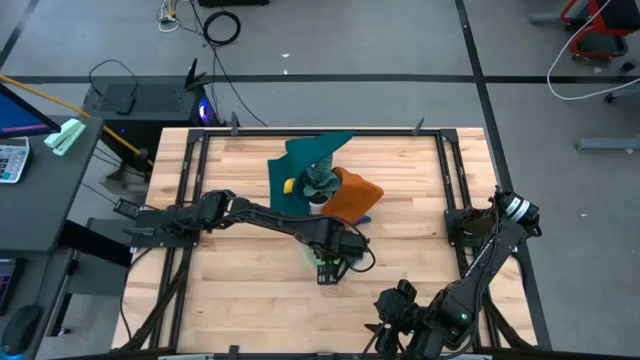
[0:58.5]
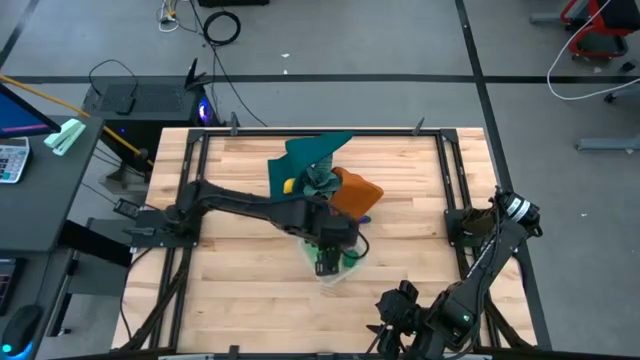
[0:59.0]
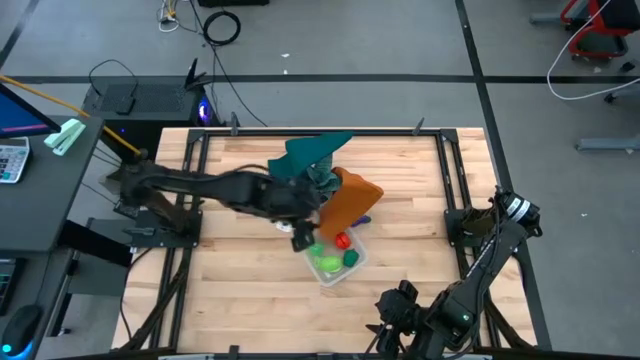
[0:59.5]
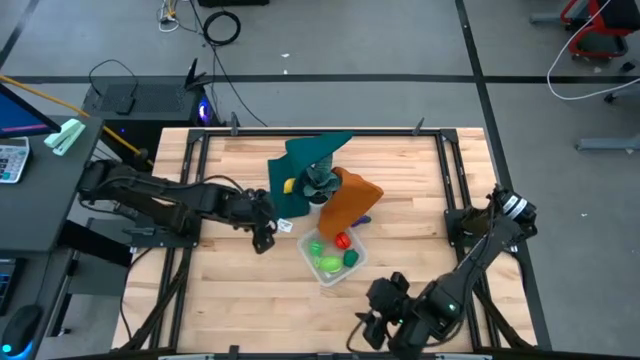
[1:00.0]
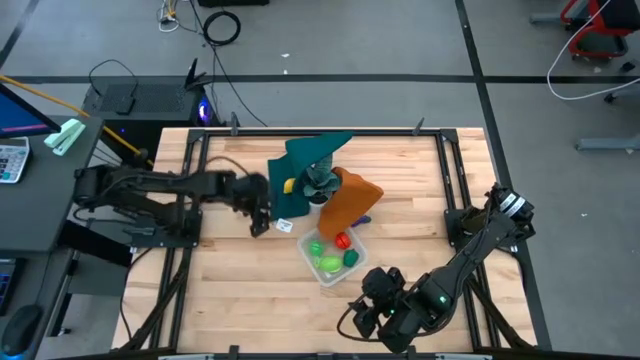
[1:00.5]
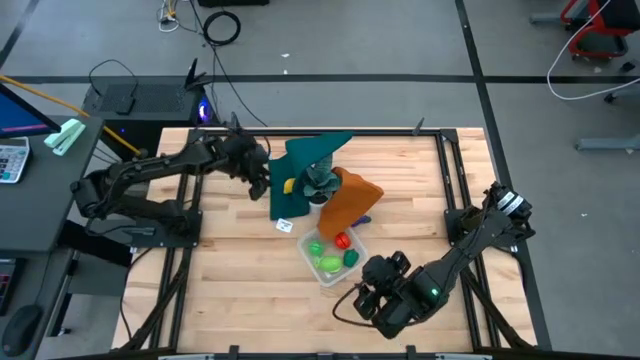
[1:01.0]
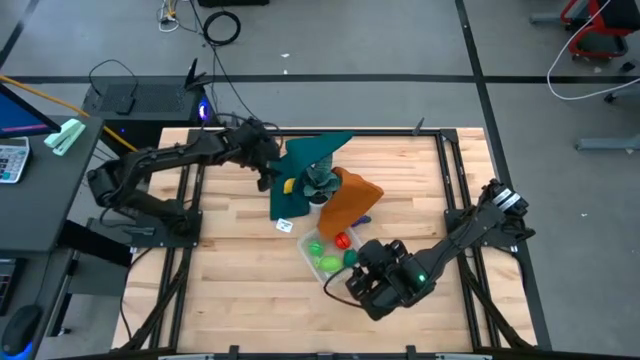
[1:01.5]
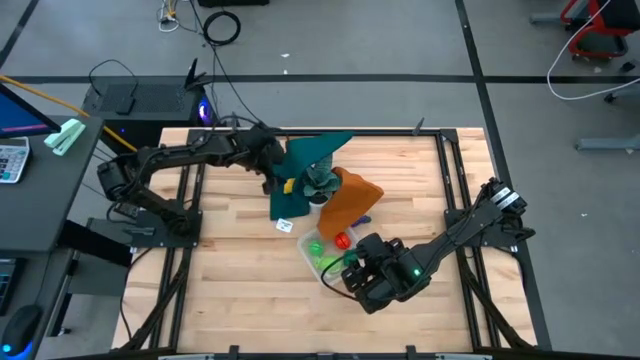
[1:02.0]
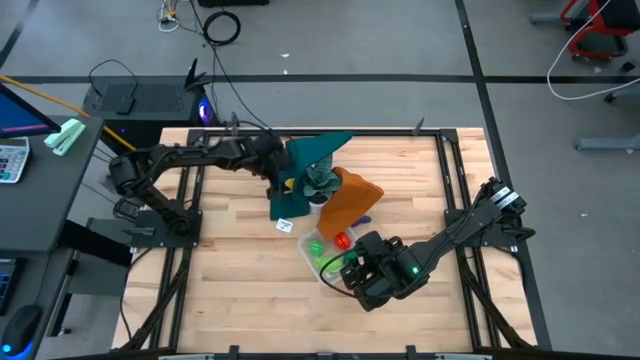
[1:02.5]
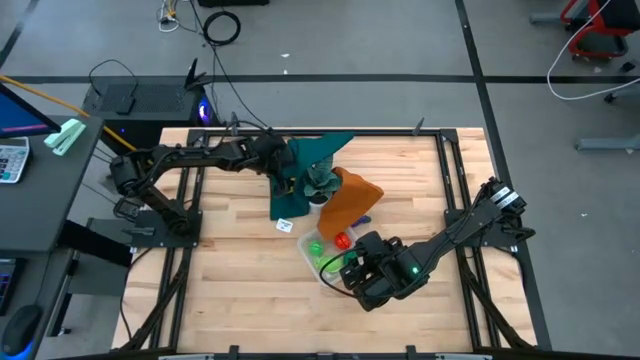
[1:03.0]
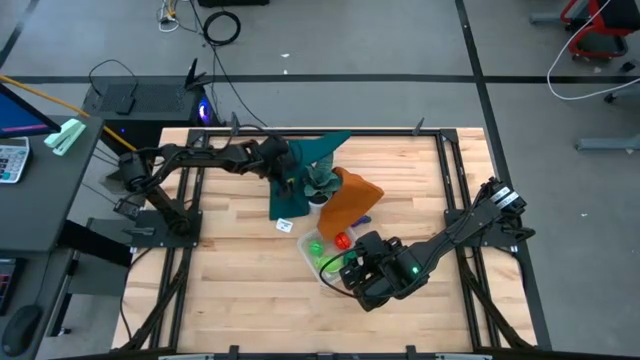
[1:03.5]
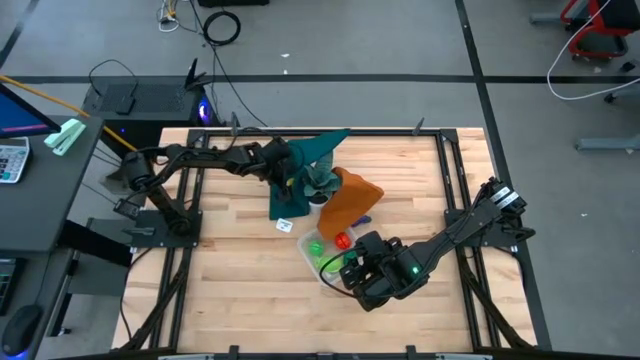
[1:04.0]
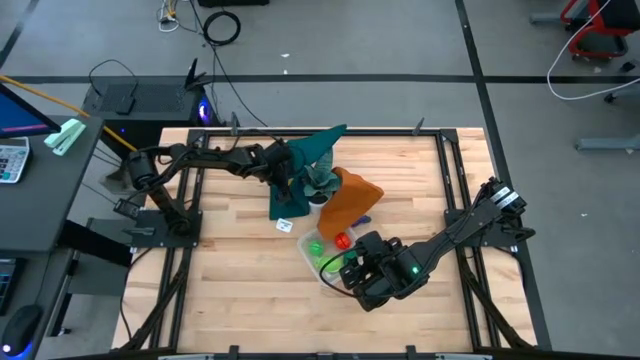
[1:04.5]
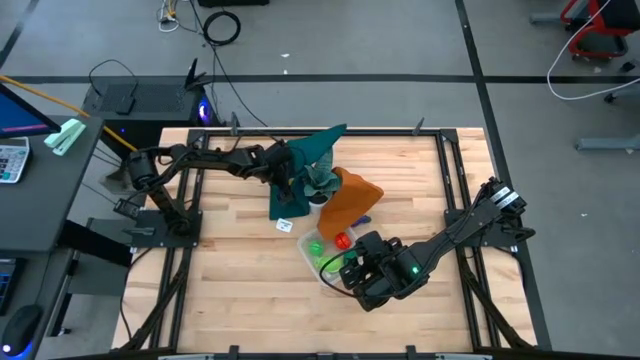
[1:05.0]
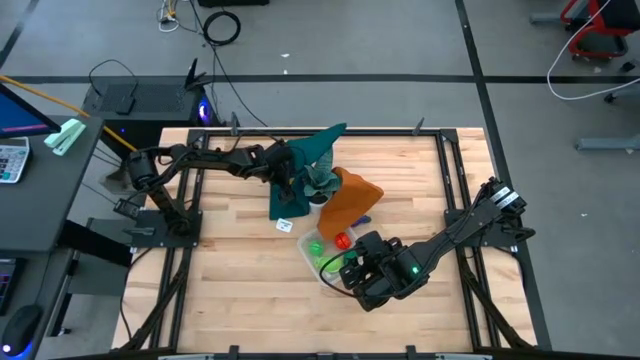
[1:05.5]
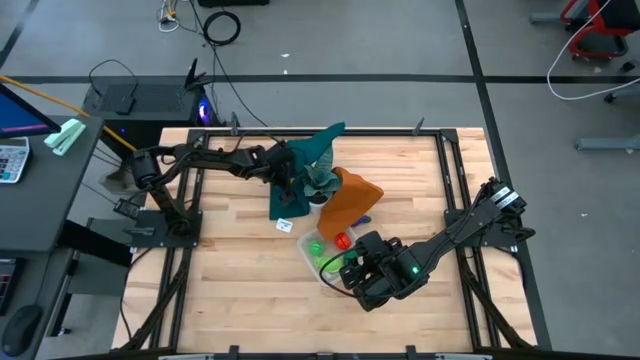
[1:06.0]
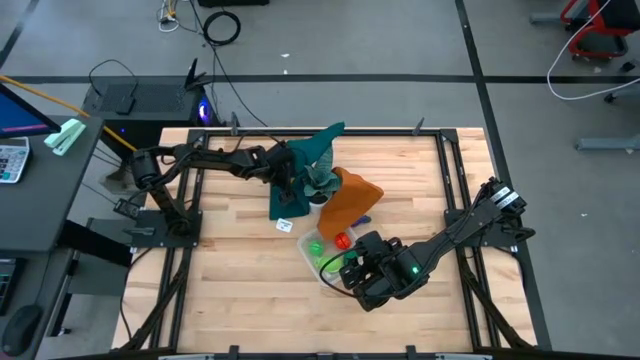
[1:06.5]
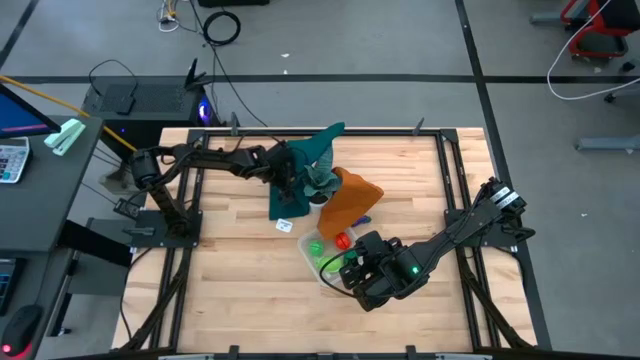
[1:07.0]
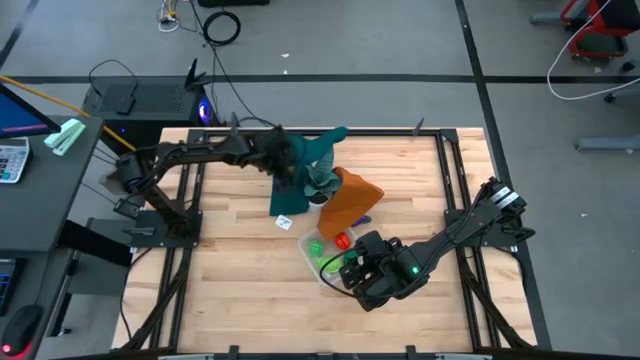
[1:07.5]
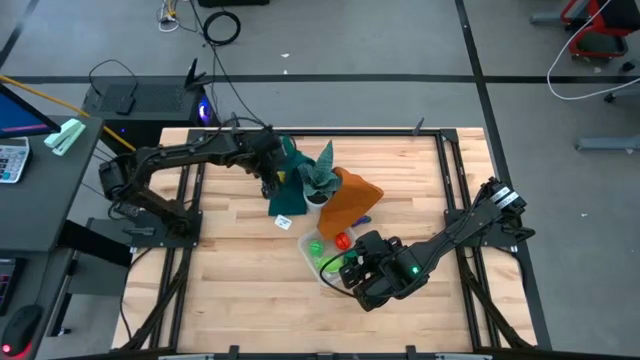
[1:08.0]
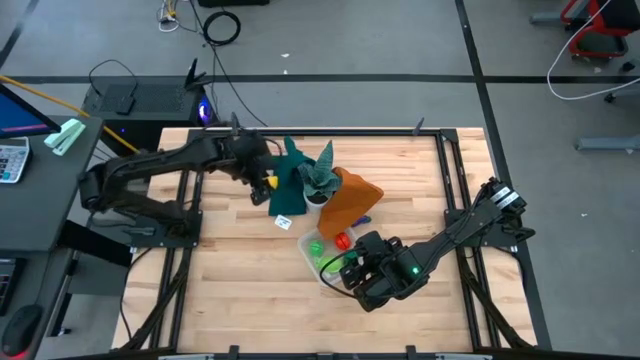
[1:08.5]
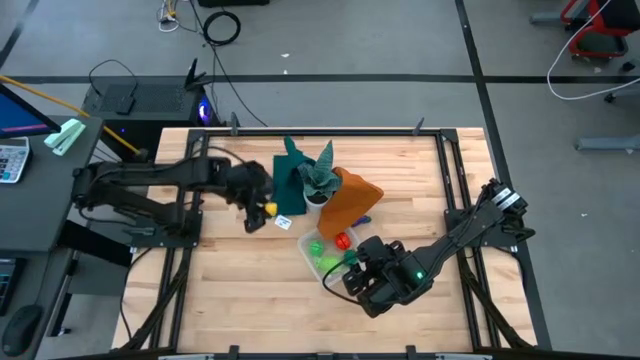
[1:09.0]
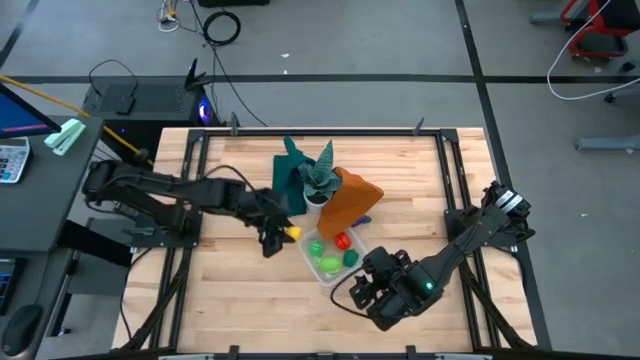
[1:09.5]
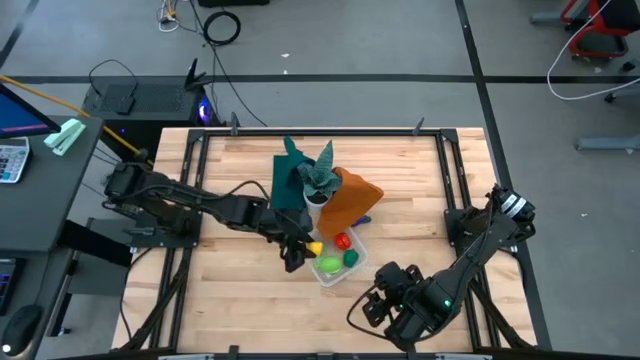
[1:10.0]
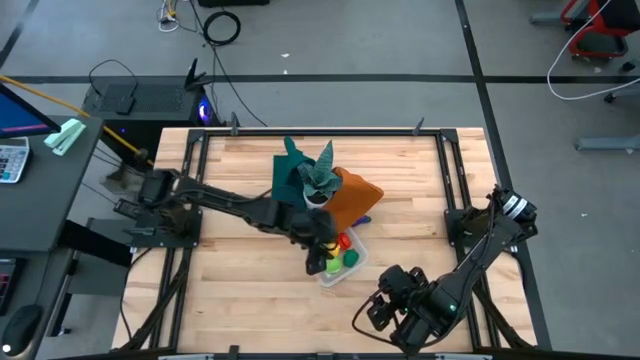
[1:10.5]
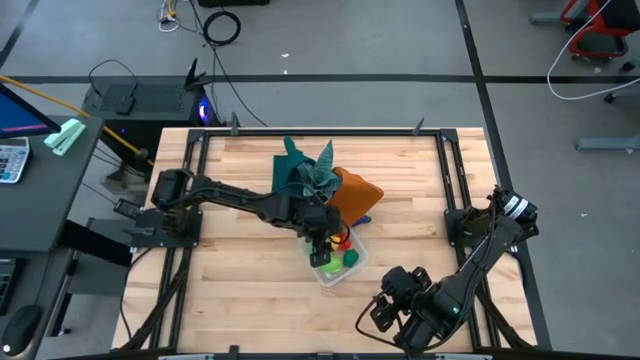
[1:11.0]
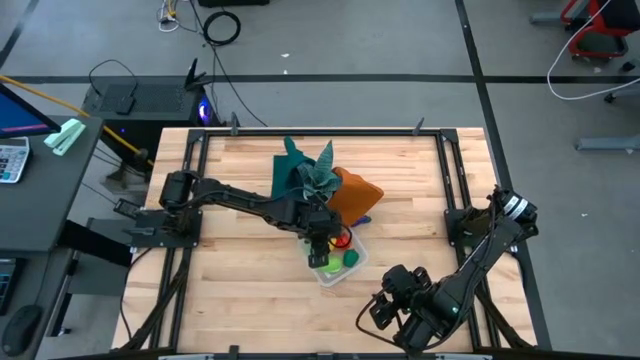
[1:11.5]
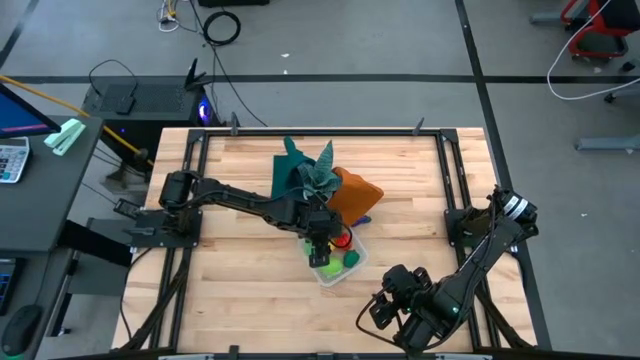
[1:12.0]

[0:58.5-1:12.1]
Task: Pick and placing Produce into tupperware
Put the lemon into the transparent bin

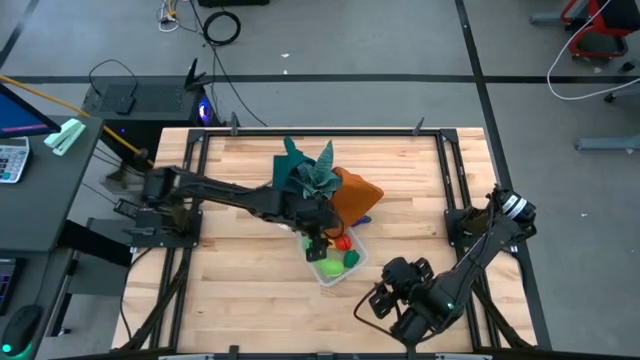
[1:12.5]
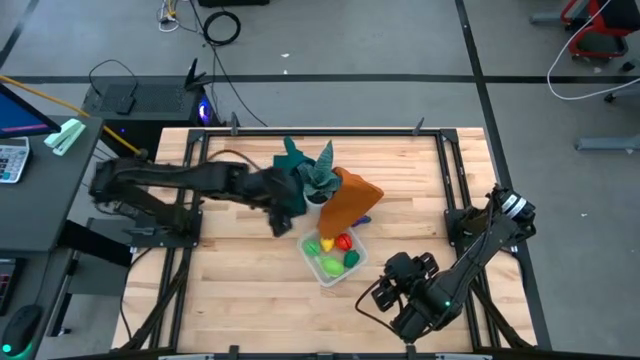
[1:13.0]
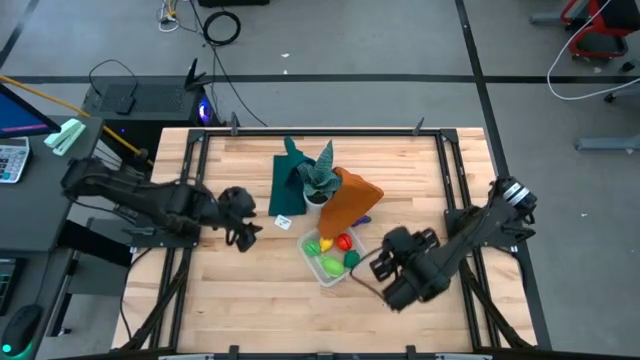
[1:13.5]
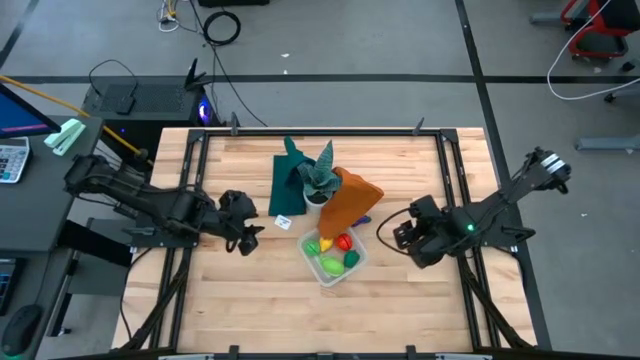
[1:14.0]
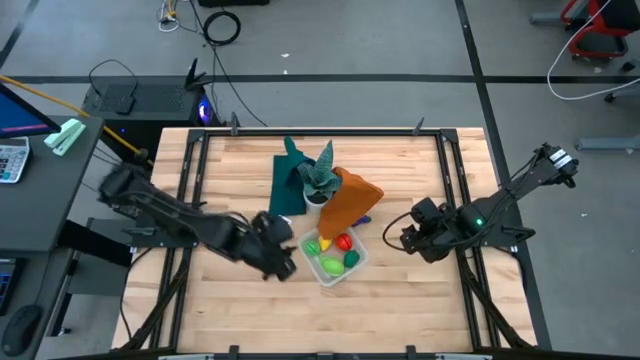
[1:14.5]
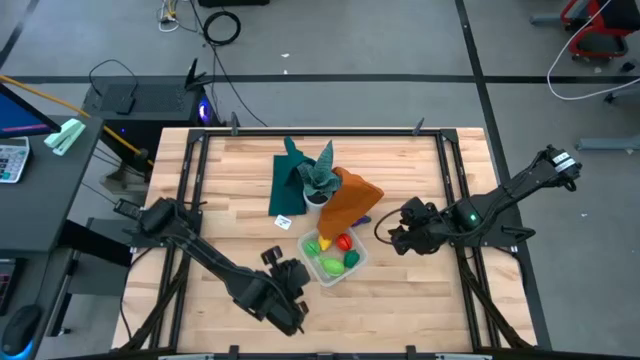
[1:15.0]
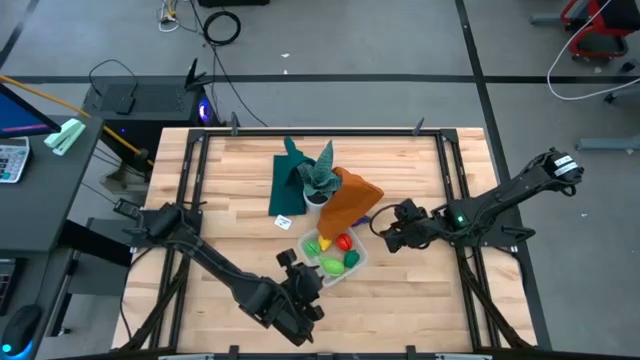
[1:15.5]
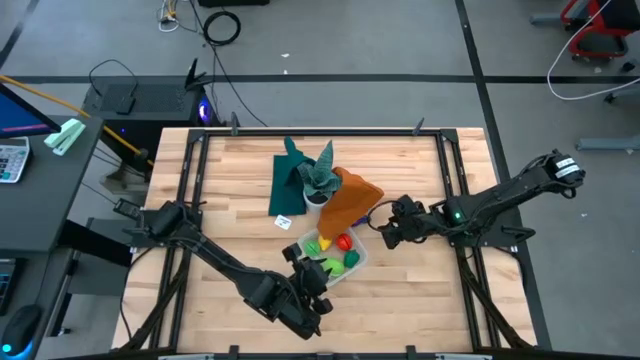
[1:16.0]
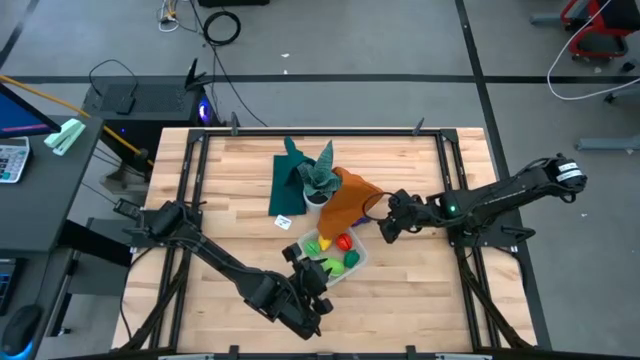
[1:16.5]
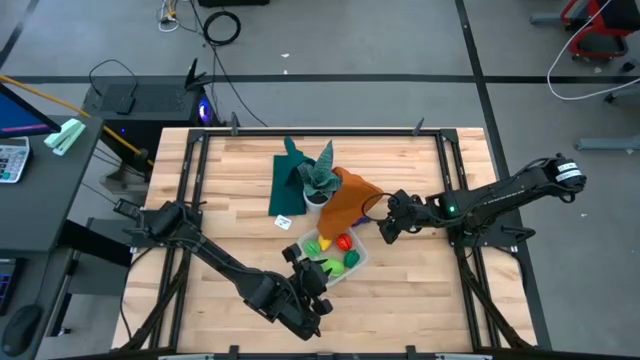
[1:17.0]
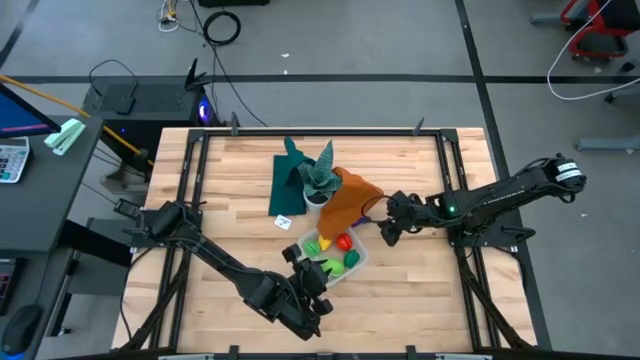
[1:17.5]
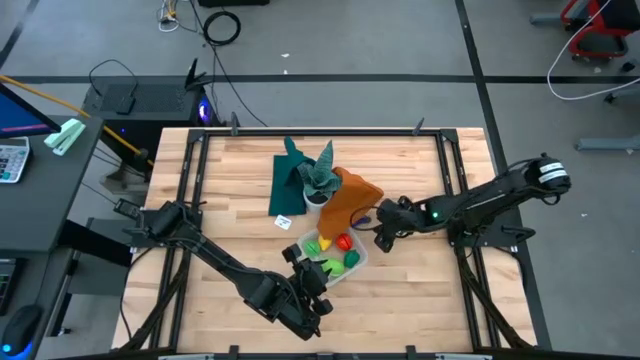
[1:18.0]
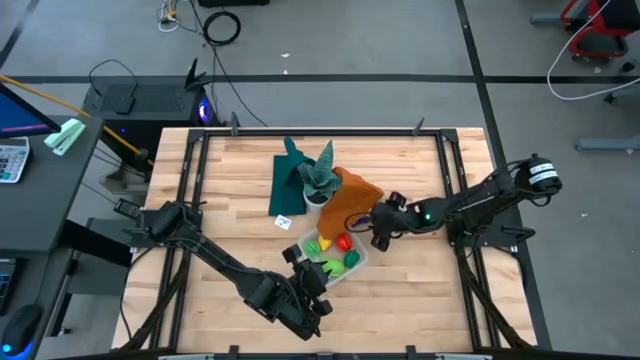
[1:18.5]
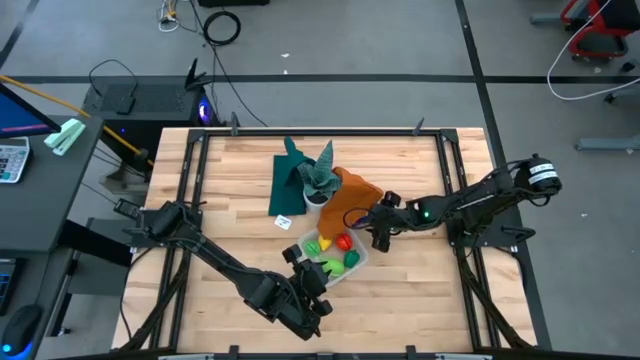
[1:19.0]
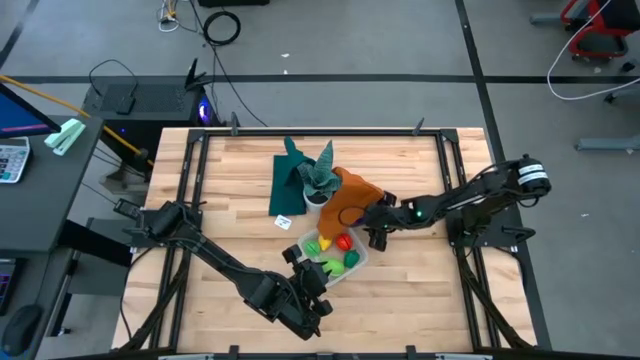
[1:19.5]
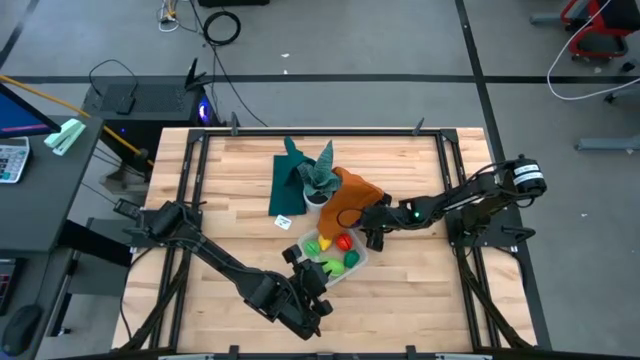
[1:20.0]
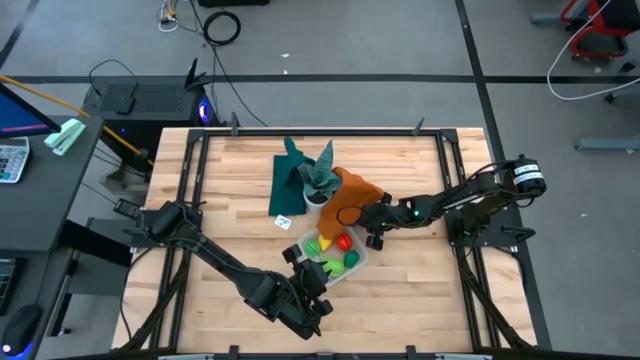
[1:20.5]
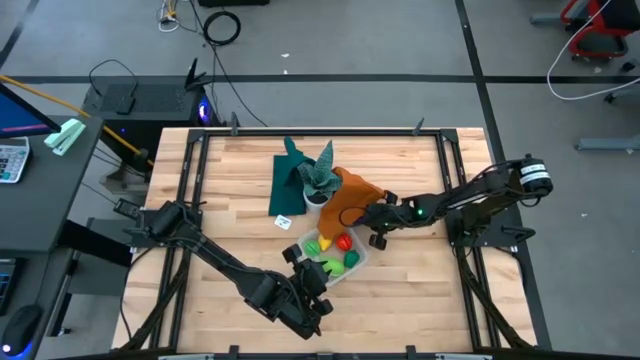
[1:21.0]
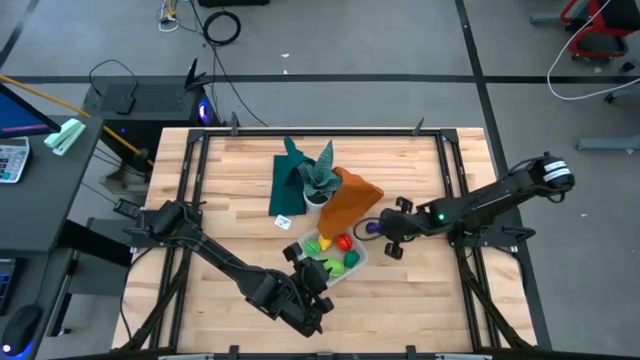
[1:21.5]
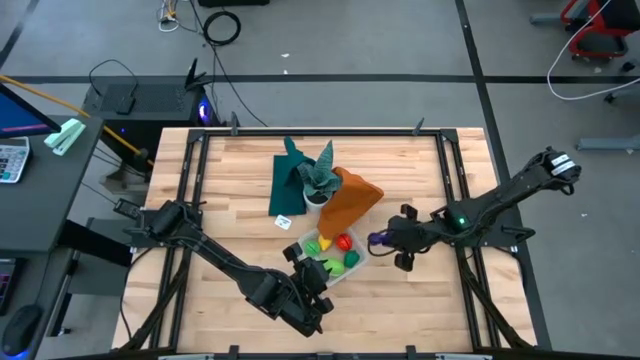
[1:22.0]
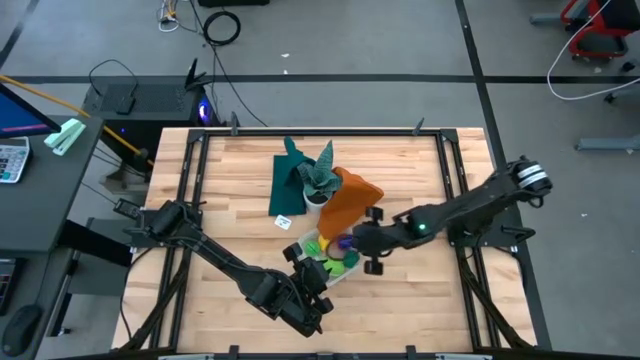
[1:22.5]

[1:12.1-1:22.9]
Put the eggplant into the transparent bin
